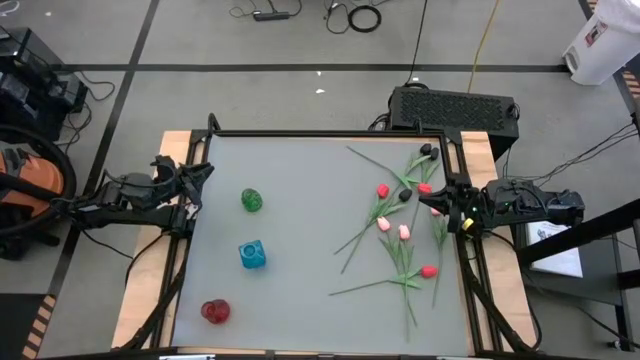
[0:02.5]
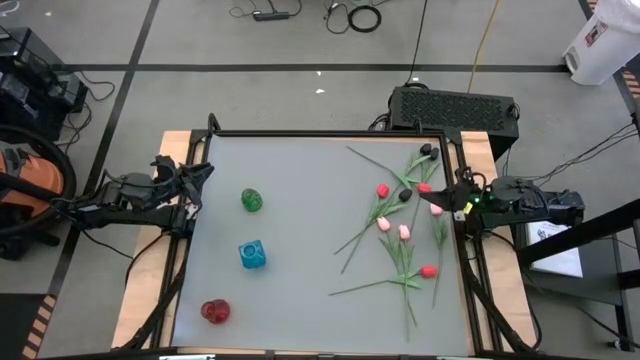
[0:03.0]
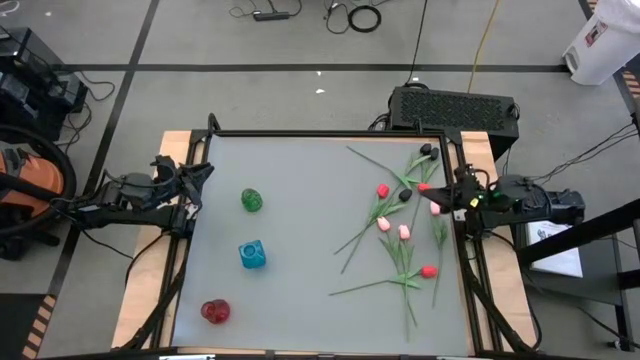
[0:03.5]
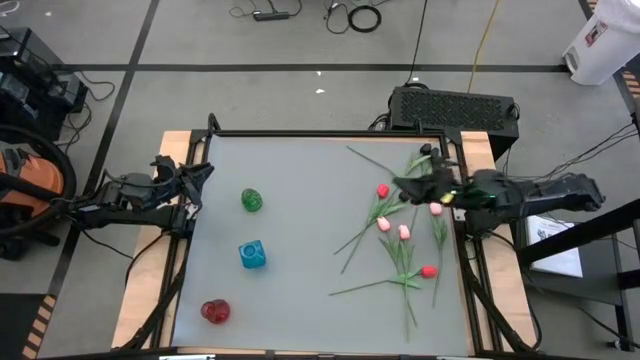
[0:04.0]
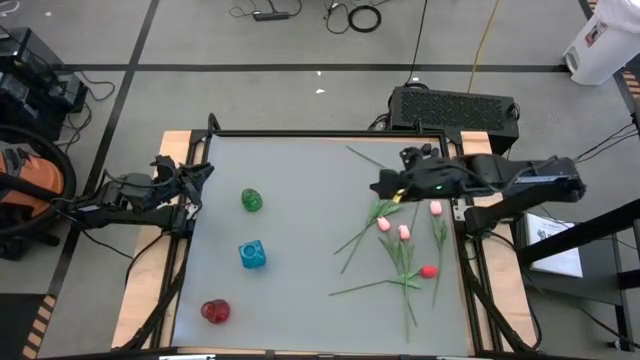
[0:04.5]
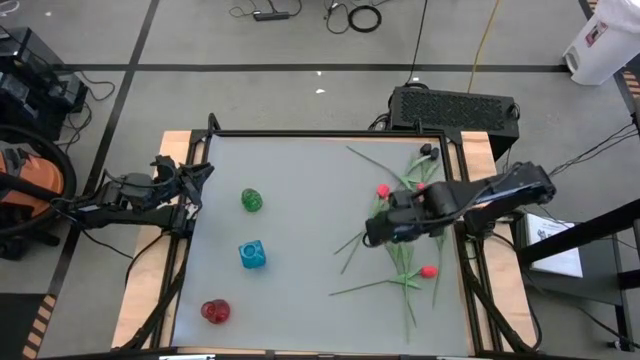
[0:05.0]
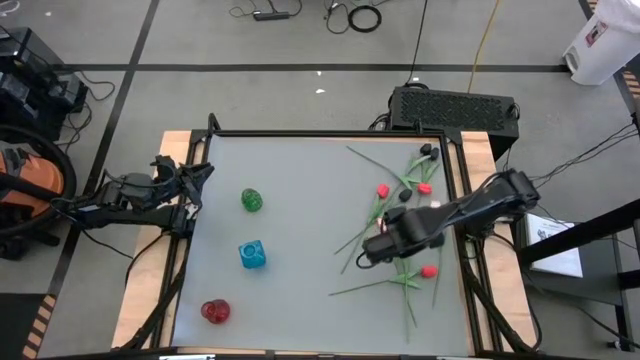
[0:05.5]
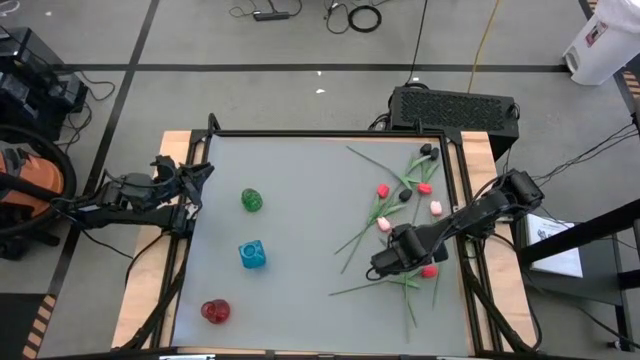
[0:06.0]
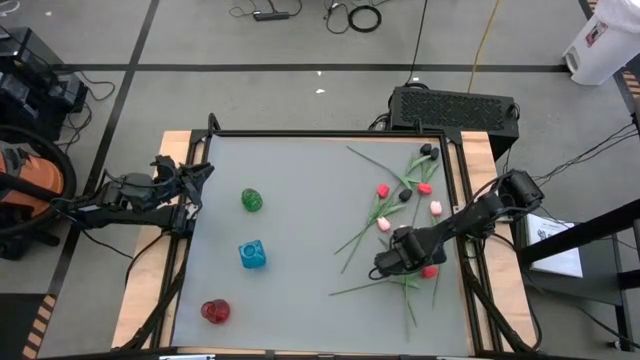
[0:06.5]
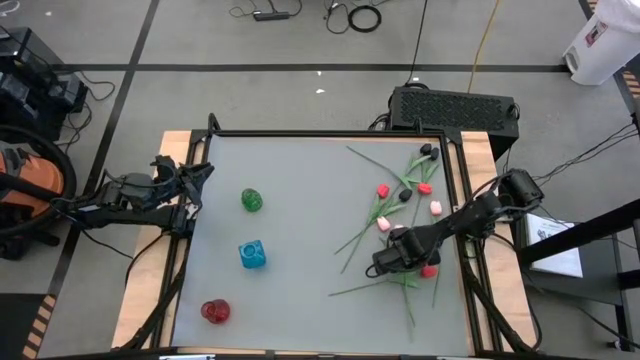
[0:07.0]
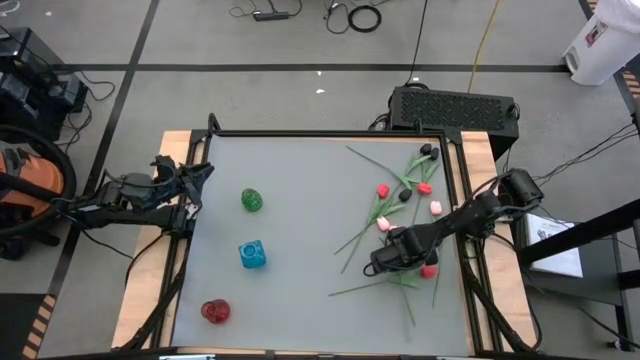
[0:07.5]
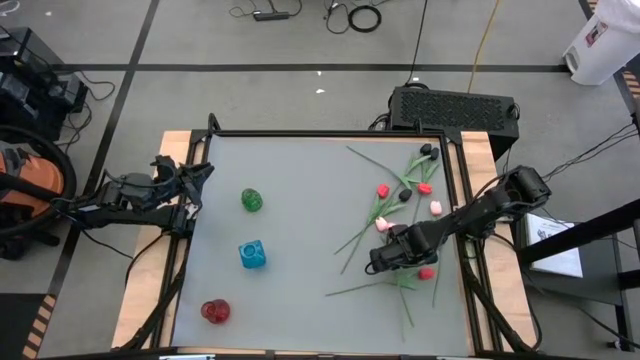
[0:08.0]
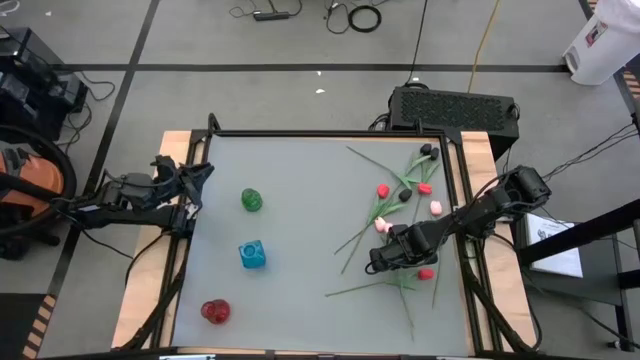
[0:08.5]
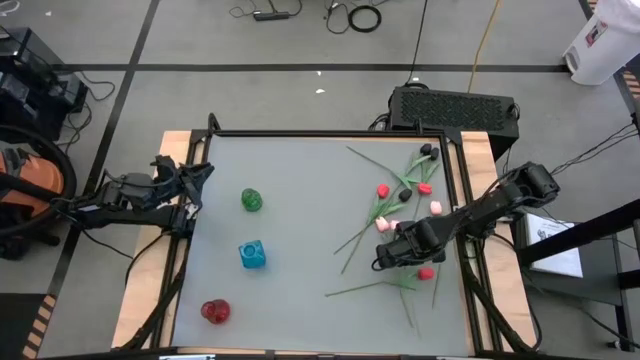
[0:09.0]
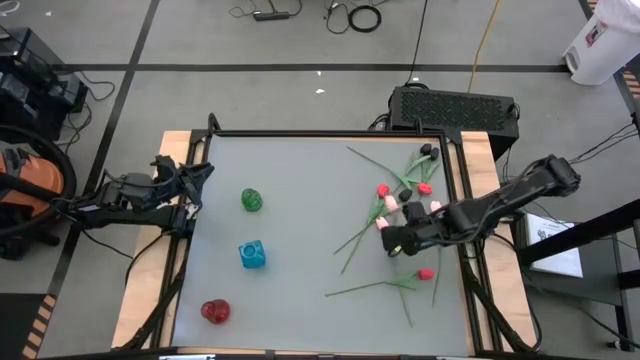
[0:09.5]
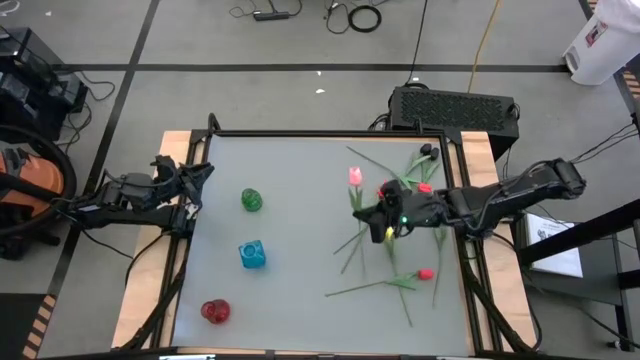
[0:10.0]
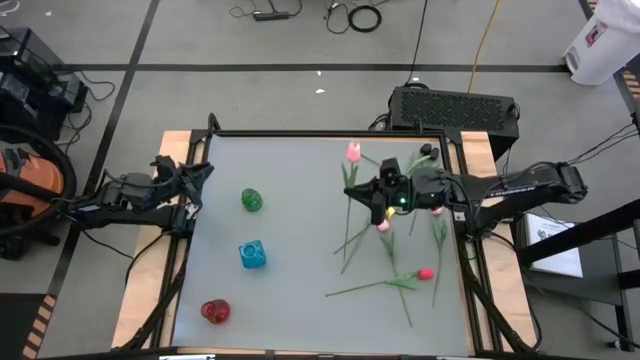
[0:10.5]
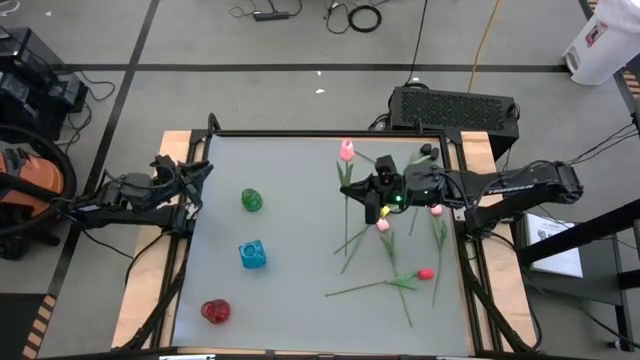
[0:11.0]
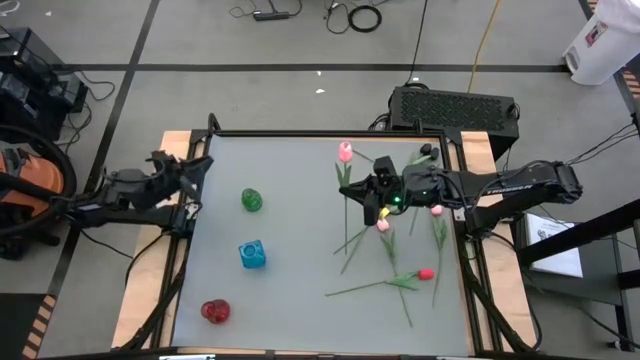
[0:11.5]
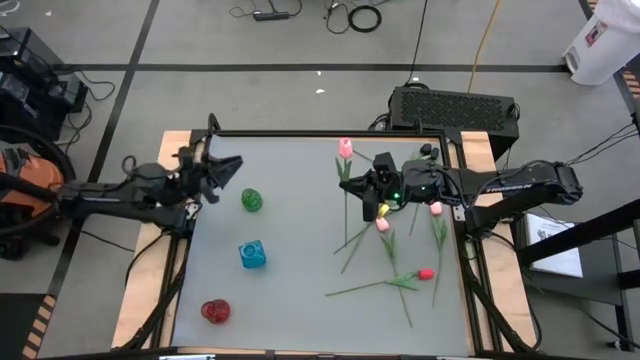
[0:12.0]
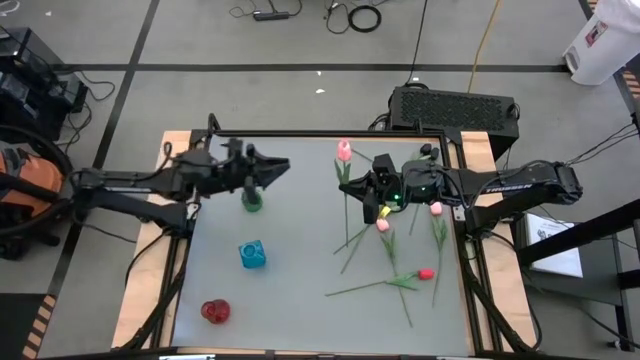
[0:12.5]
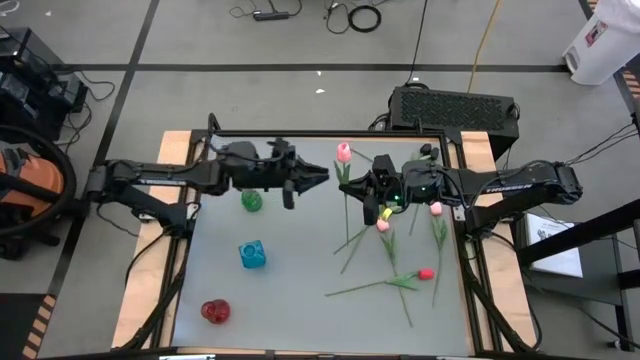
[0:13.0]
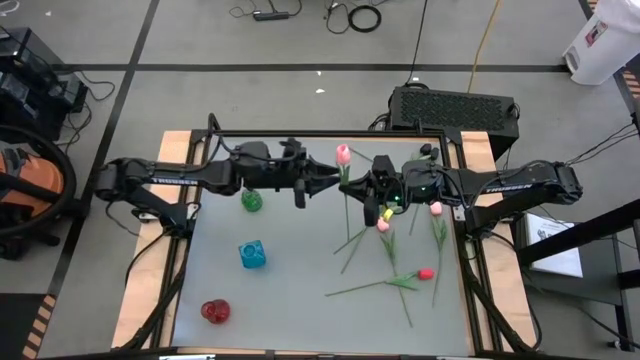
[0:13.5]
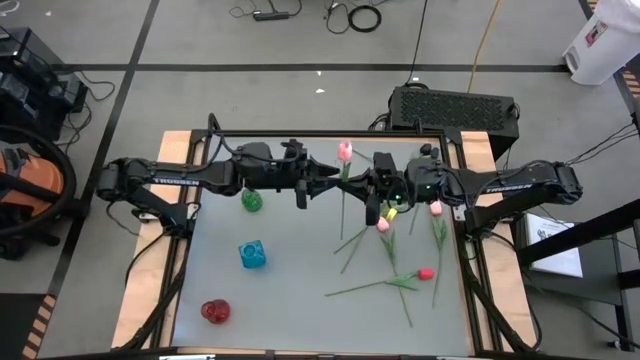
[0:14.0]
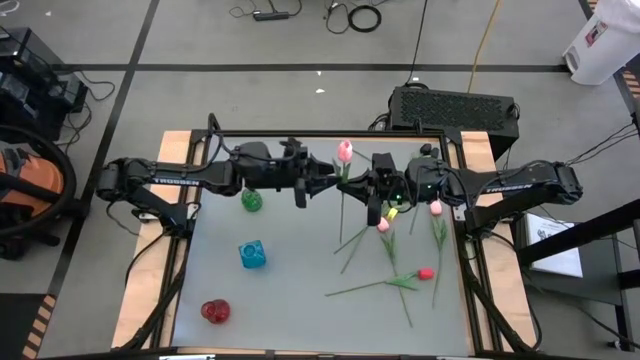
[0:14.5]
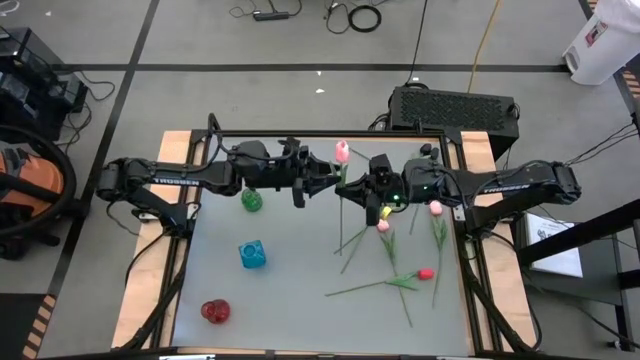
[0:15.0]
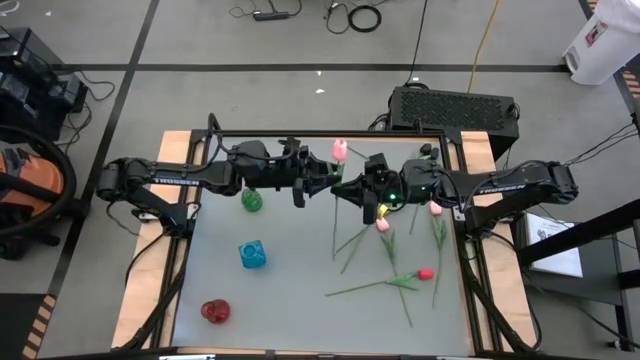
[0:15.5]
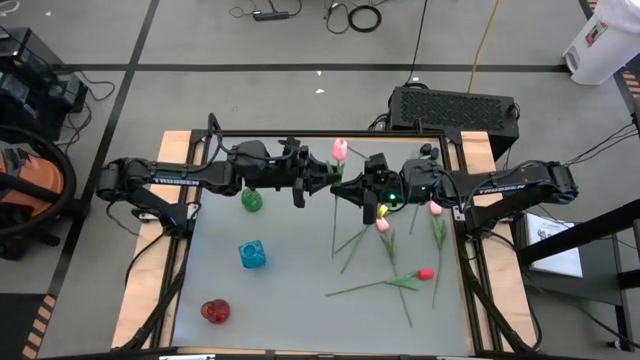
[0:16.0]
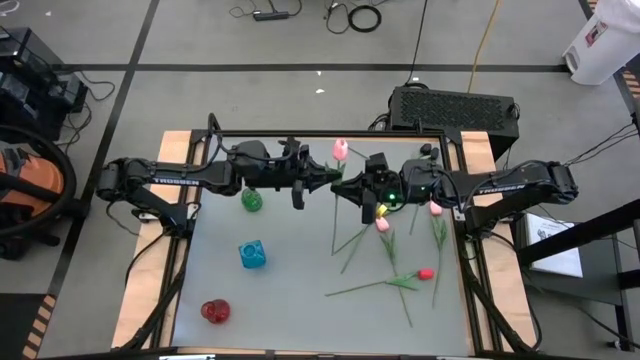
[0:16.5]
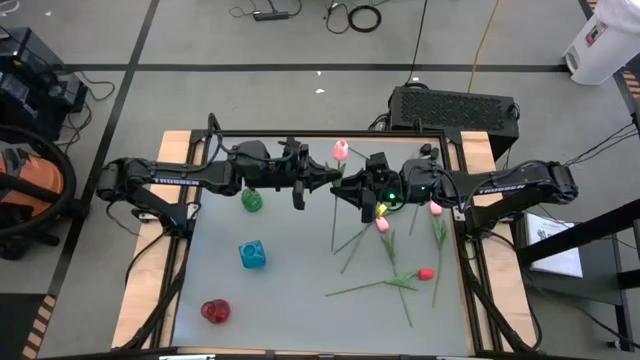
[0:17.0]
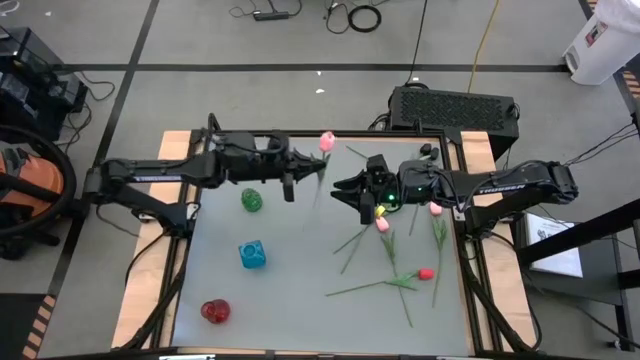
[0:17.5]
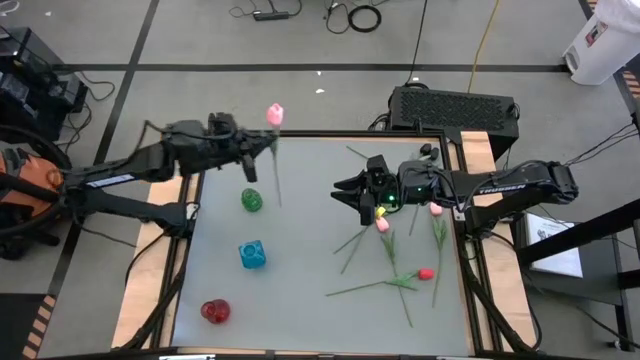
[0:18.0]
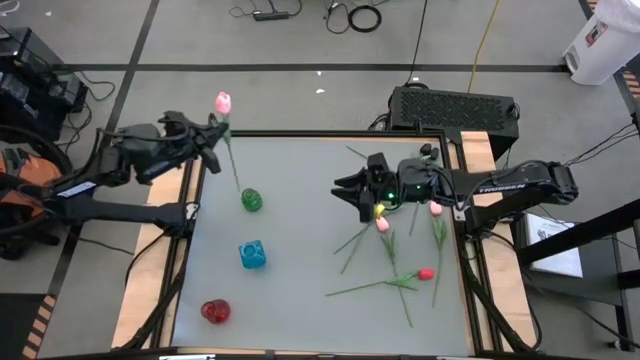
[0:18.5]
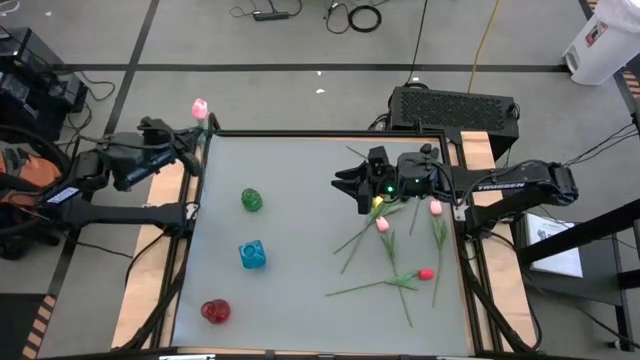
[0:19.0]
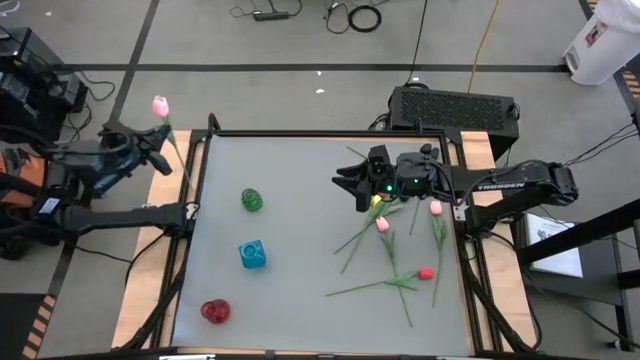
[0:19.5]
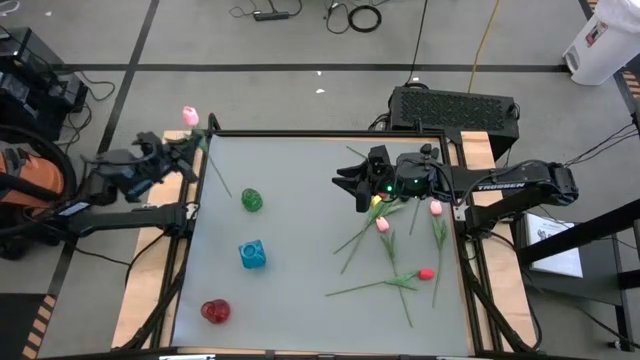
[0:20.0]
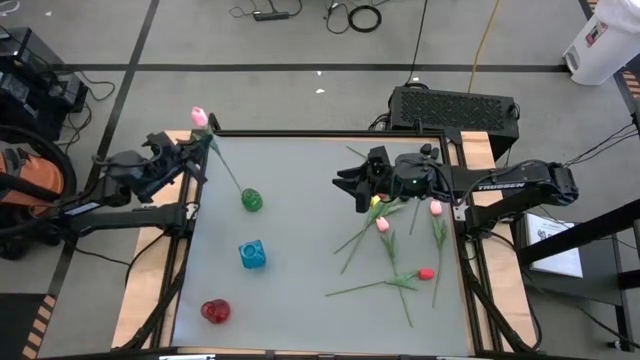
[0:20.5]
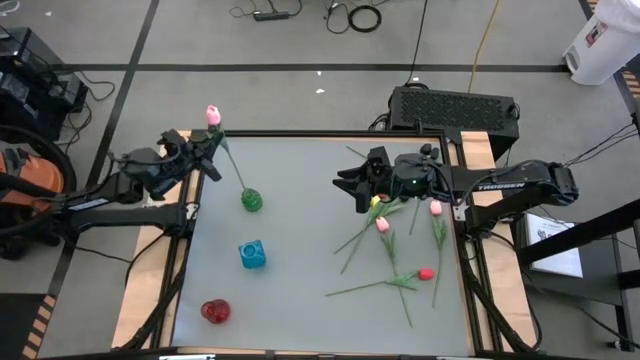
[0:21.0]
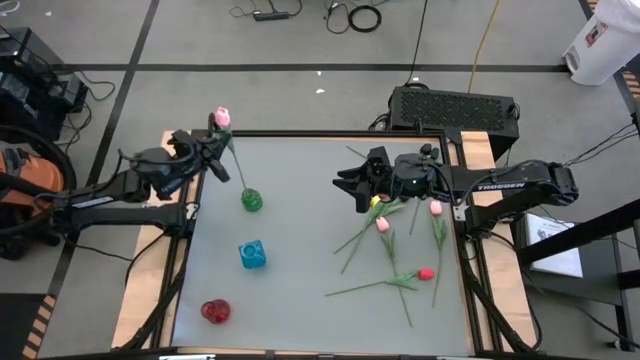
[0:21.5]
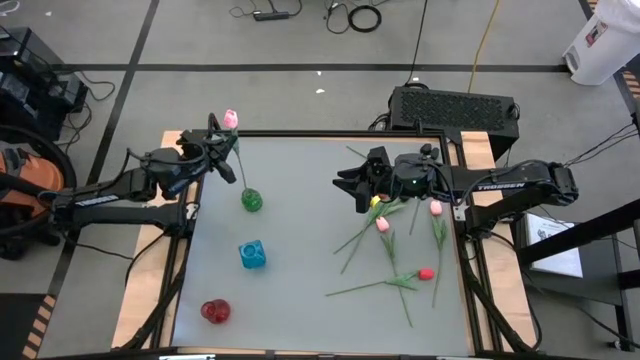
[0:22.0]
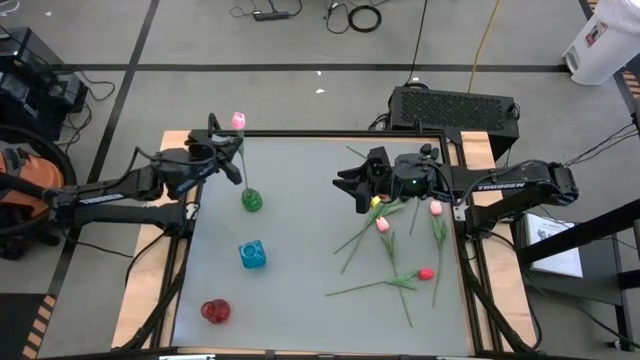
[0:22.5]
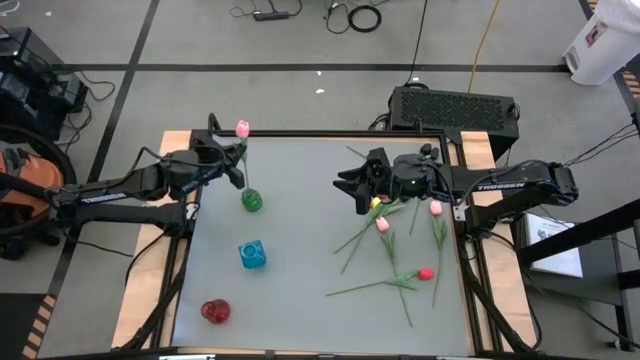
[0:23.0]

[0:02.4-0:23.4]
Task: Sort flowers into vase by color
Put the center pink flower into the green vase
